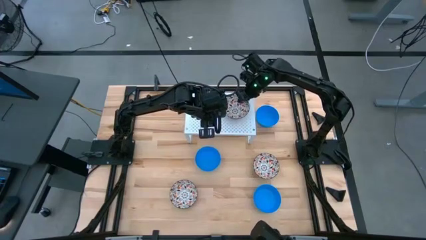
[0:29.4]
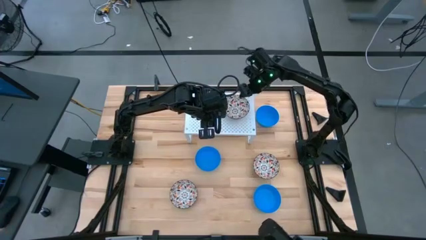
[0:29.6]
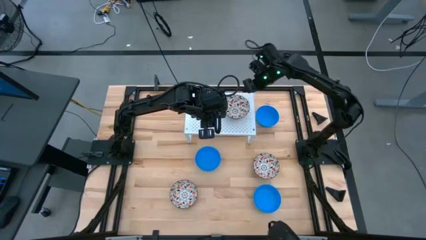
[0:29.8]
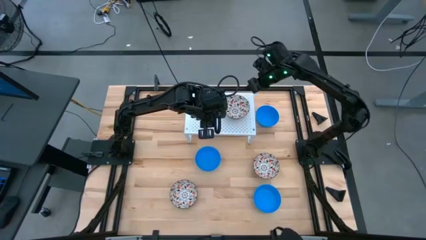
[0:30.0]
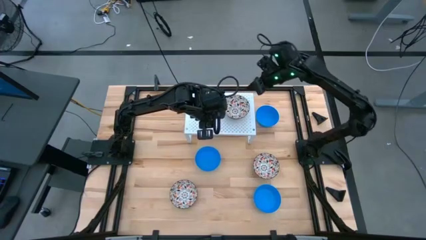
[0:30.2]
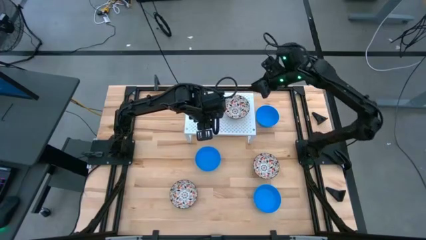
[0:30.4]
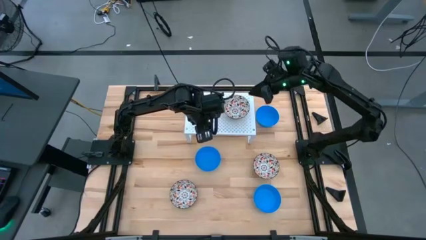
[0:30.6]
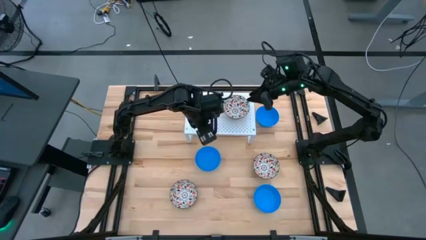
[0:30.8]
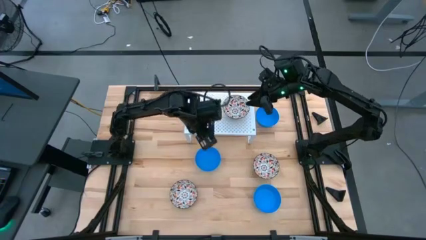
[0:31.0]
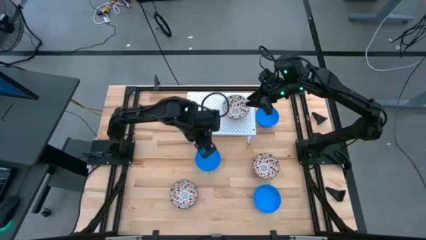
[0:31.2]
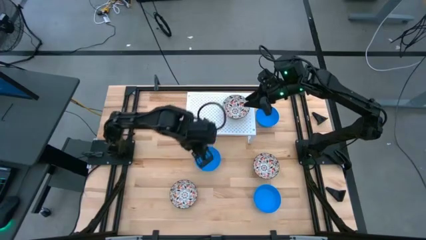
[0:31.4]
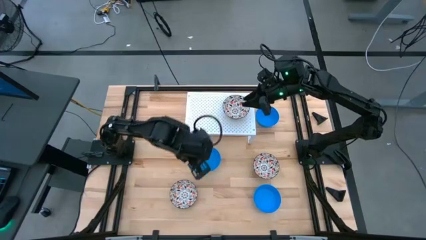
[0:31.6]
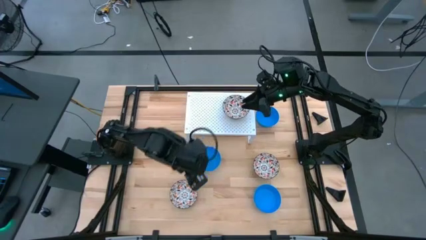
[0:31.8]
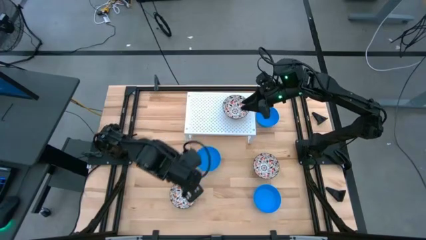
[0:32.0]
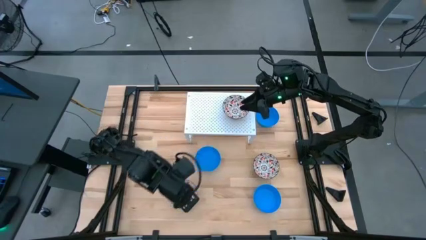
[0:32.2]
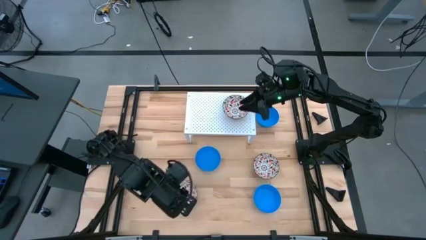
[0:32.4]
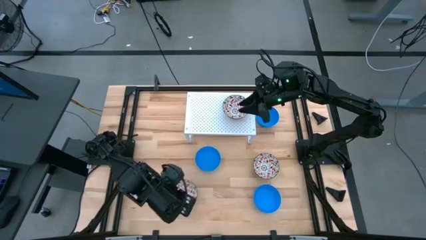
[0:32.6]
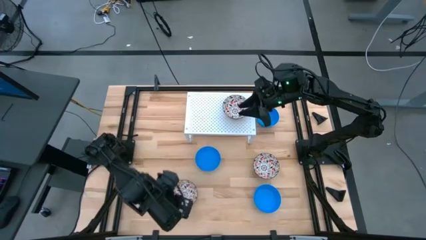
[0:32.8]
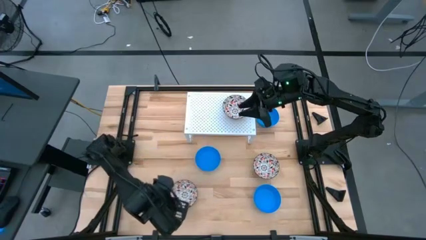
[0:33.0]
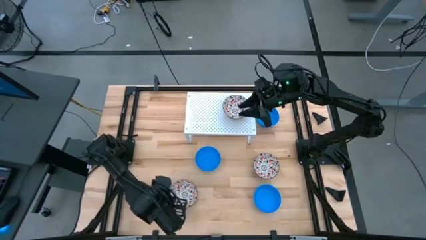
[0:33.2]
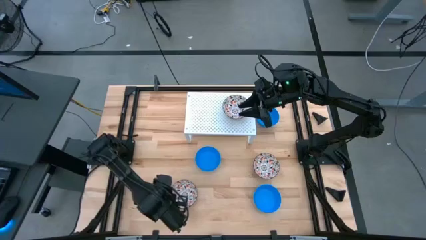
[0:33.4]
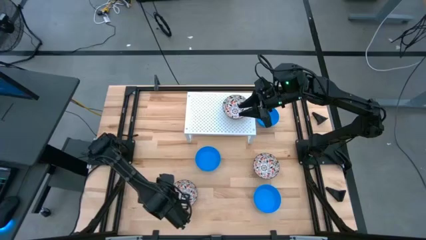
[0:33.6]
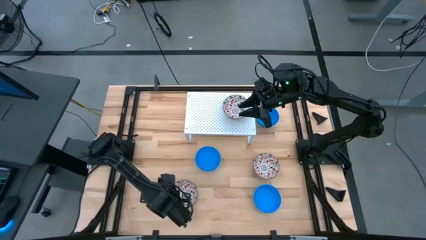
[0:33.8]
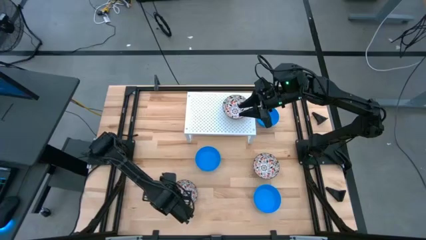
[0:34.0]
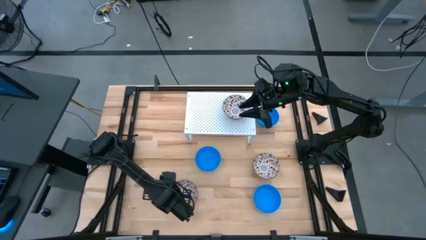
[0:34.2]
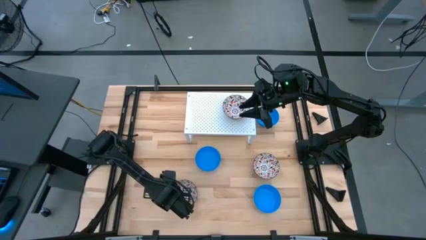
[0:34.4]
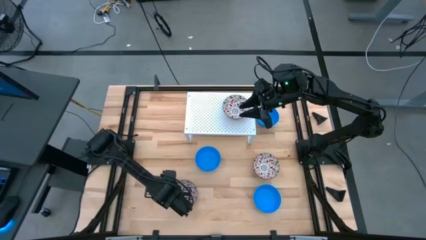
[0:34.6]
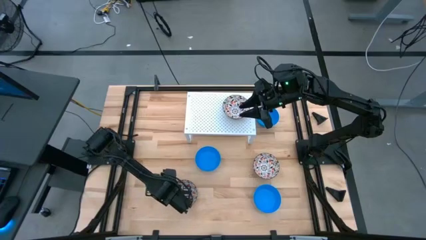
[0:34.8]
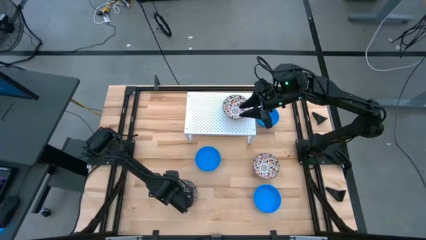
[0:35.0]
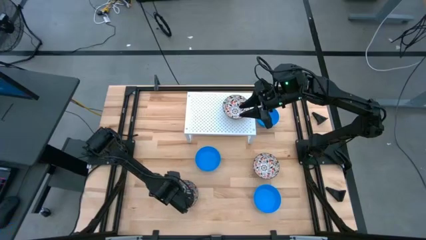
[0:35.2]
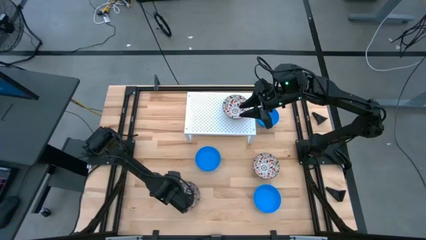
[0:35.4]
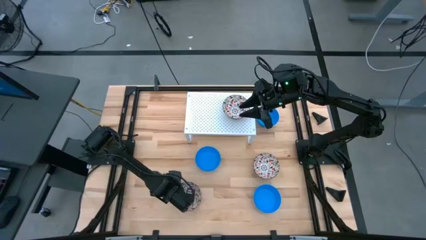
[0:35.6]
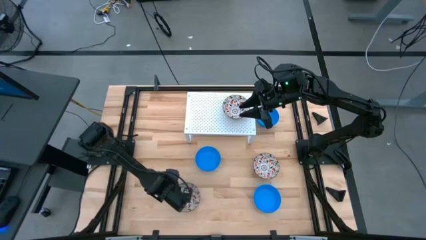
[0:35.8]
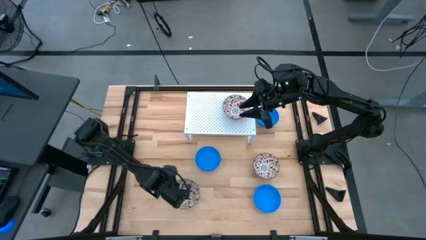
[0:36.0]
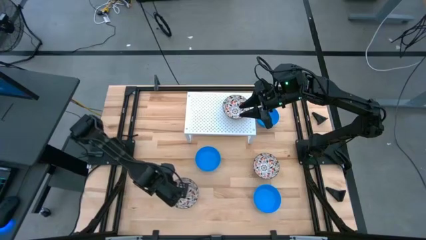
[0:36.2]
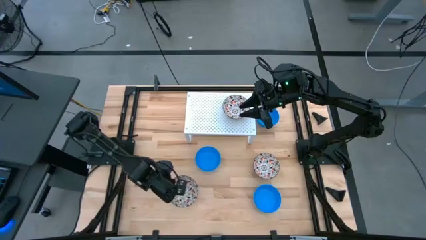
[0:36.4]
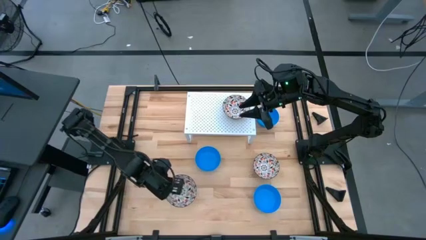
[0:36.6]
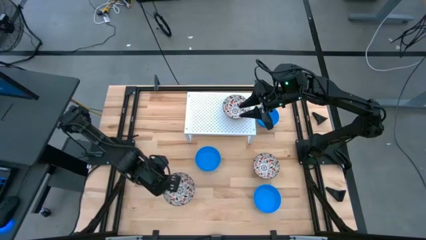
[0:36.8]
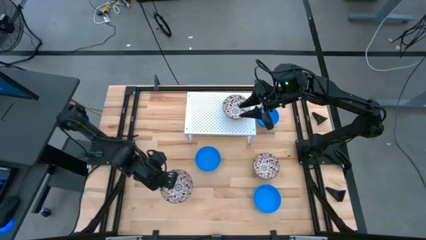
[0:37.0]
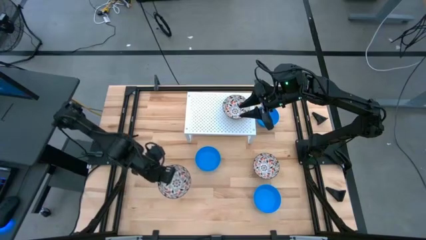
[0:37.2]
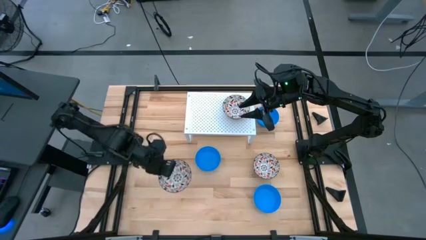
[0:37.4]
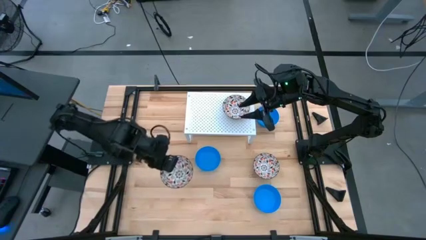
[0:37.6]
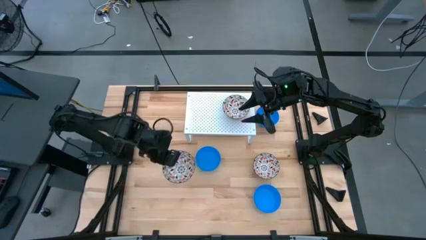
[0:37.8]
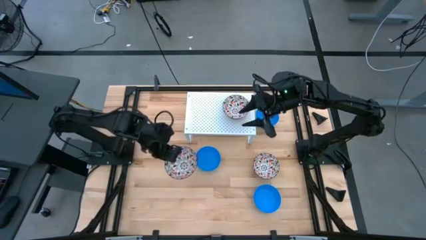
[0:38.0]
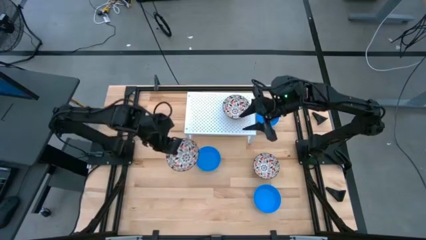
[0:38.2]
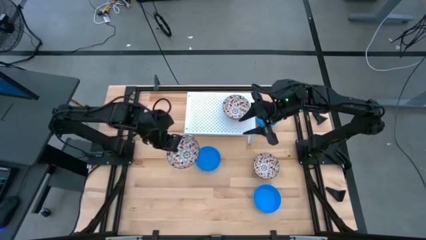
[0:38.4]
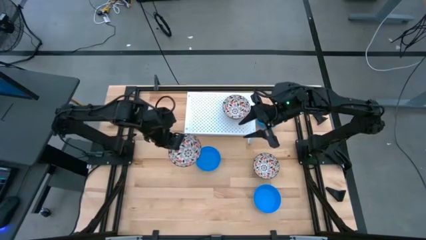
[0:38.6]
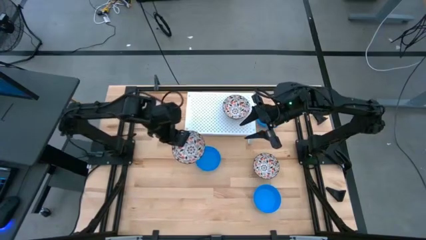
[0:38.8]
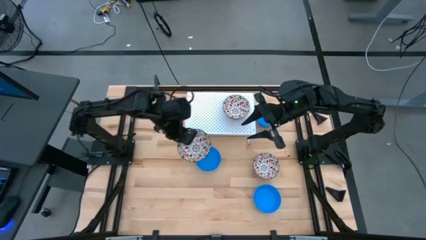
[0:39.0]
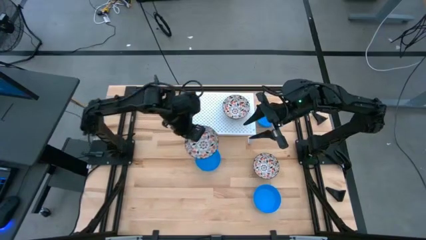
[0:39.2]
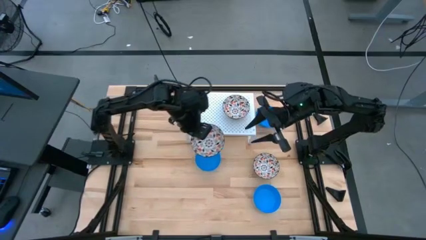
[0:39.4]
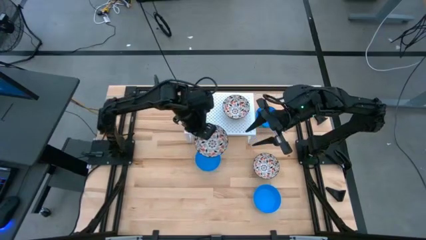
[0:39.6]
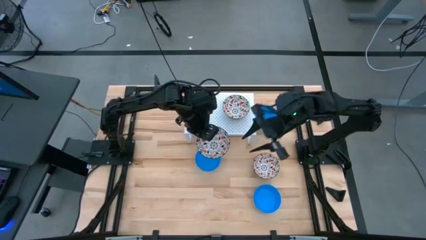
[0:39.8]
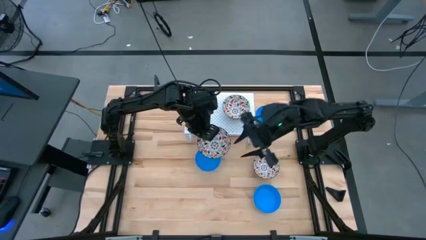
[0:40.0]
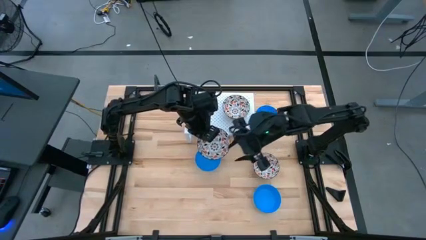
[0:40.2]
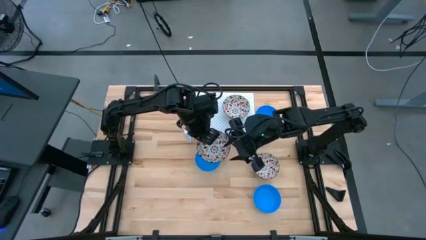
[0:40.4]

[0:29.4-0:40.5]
Task: Pick & Place Mini bowls
Stack the left white patterned bowl on top of the other white patterned bowl on the shelf

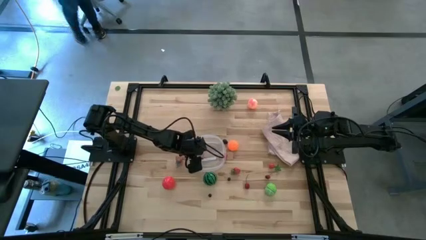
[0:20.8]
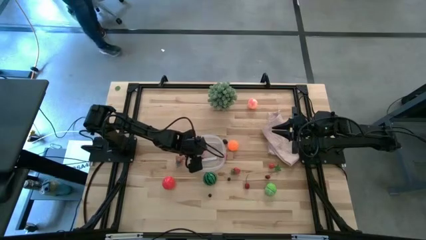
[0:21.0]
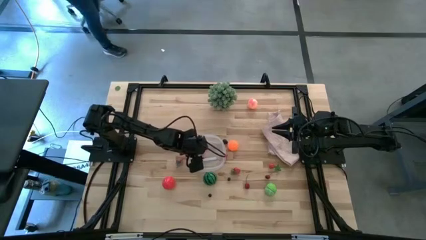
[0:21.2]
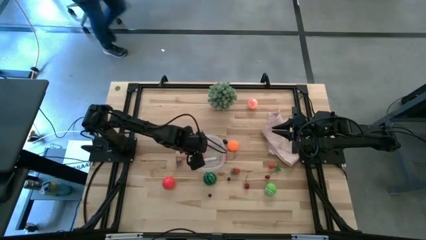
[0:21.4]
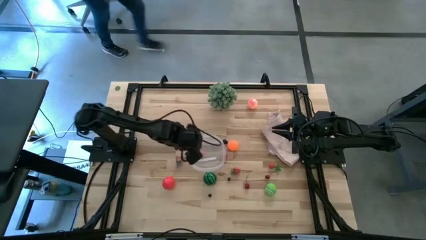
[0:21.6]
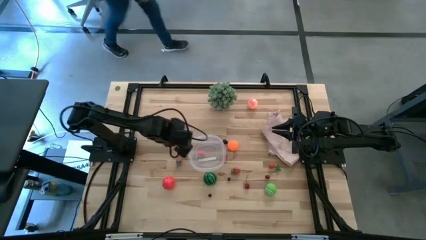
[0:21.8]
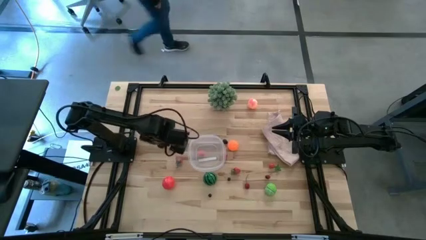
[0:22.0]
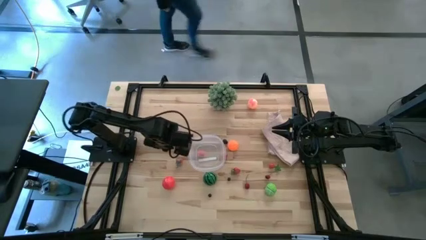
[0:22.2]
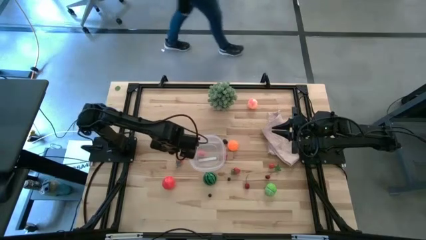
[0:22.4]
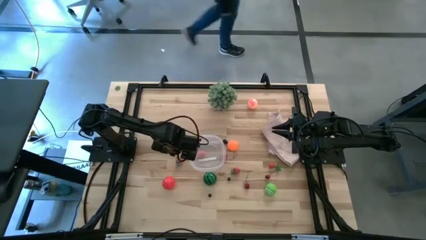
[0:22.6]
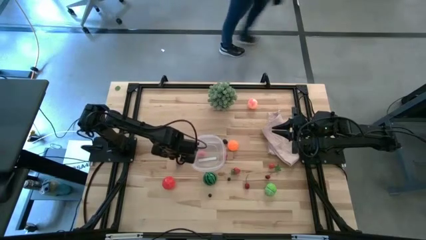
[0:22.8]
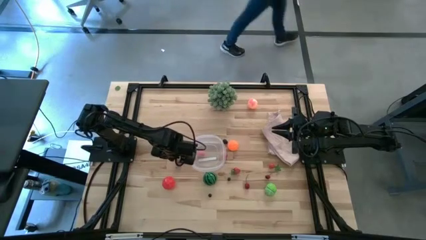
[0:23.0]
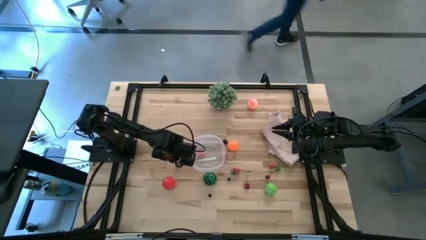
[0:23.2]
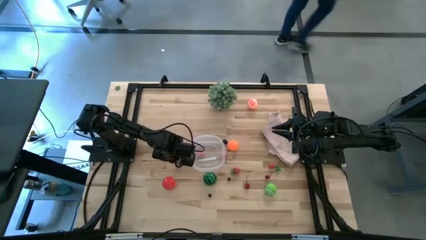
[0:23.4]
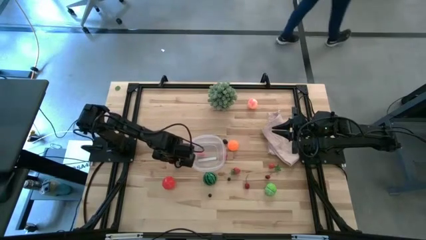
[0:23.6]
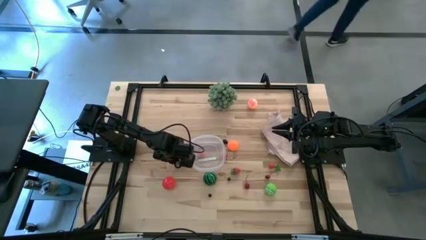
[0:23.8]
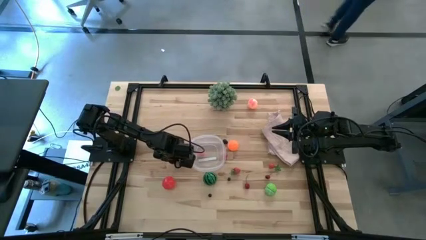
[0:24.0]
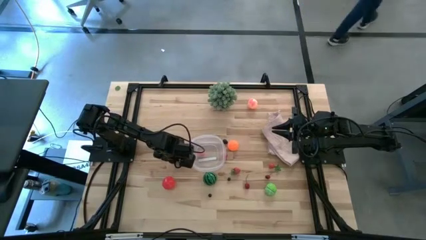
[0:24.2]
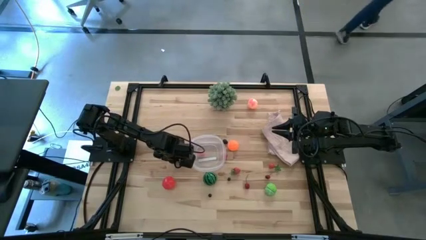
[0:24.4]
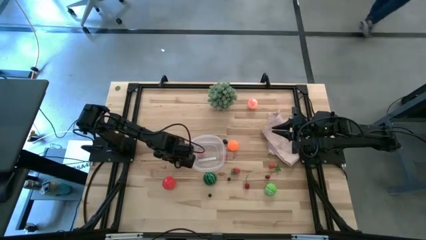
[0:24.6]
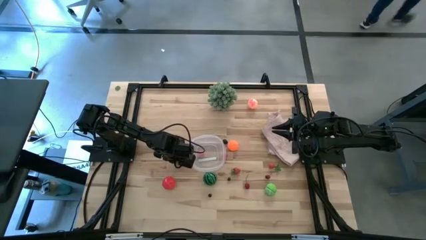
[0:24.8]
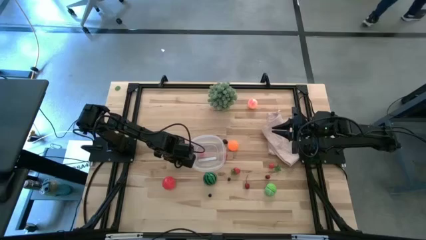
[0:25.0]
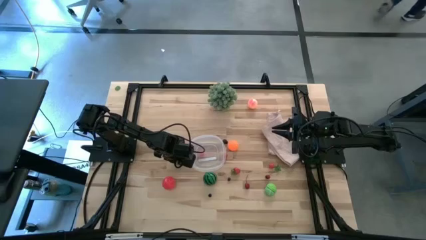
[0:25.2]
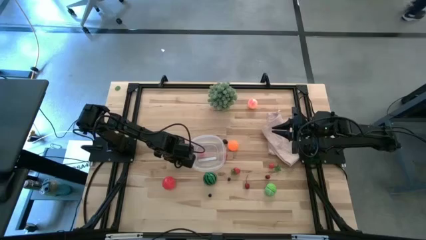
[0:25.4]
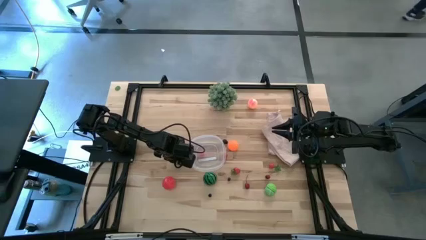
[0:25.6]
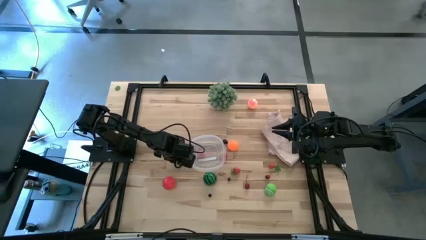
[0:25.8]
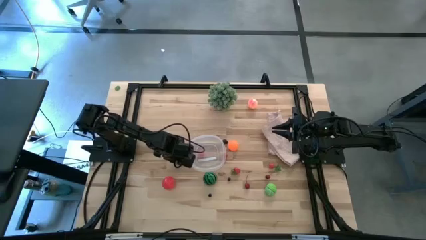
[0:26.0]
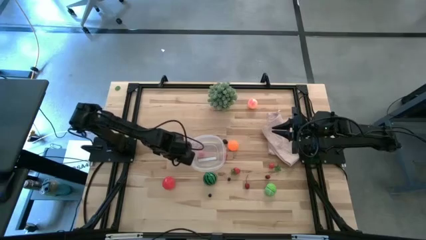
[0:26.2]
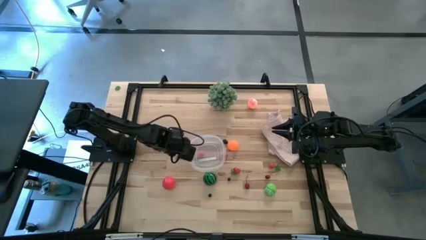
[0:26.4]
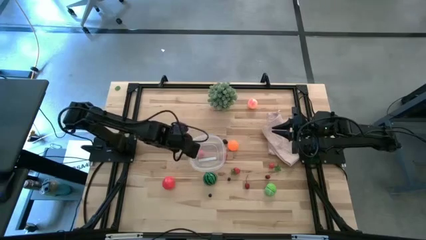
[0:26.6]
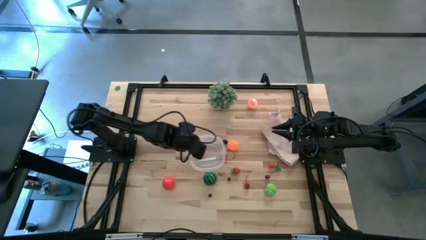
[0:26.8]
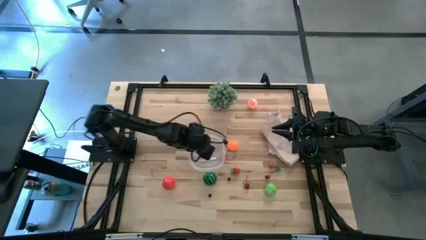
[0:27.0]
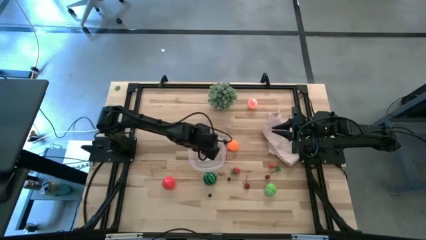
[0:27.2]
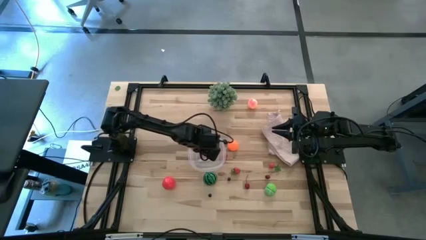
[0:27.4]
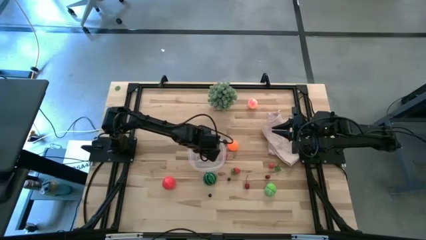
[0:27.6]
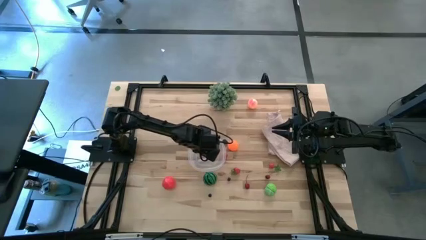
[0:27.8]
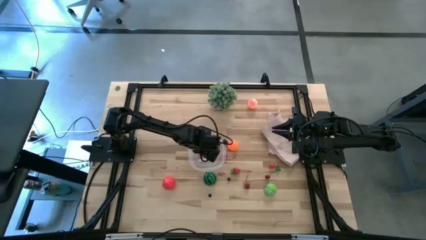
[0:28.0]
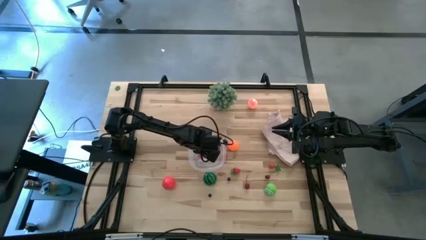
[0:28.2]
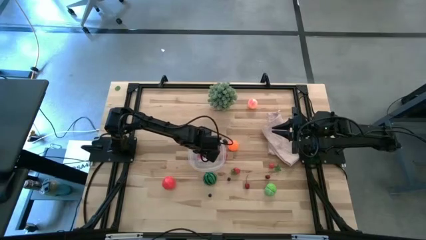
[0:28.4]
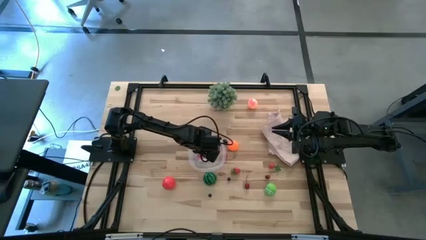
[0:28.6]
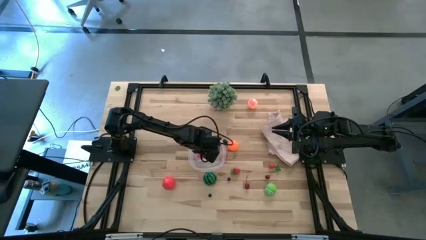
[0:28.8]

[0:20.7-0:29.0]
Task: Pick and placing Produce into tupperware
Put the left red strawberry into the transparent bin
